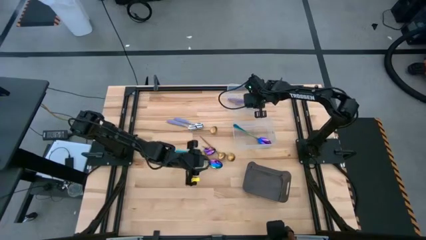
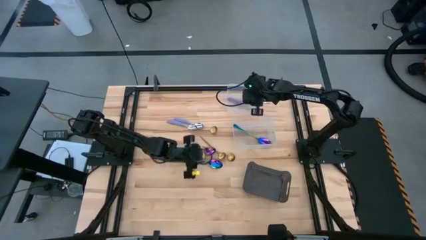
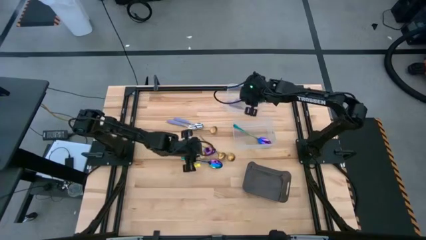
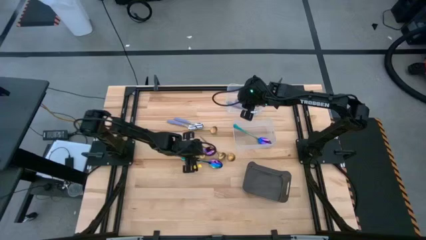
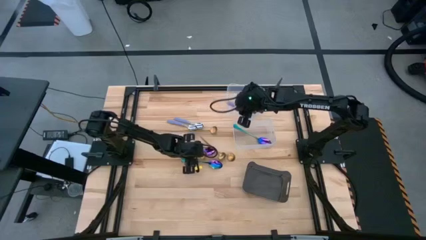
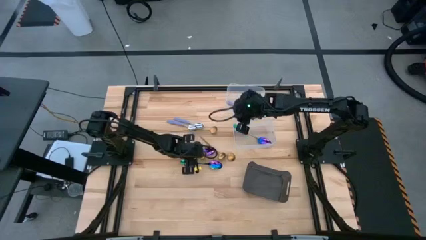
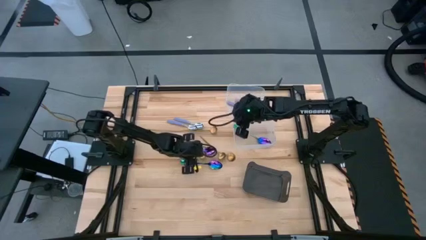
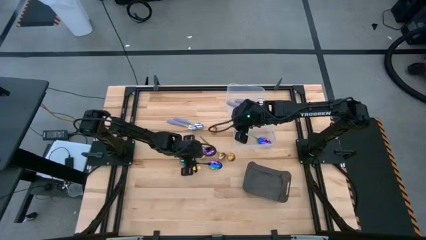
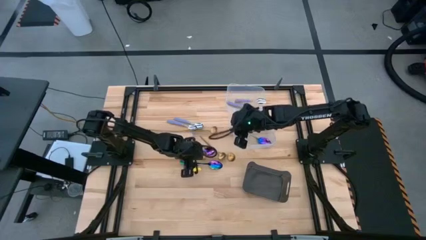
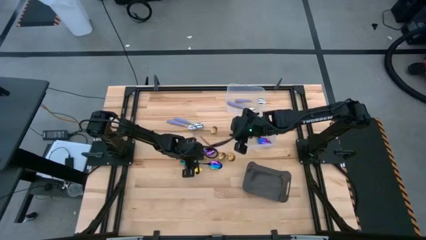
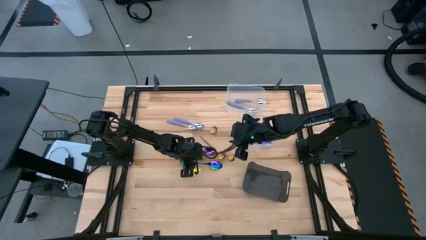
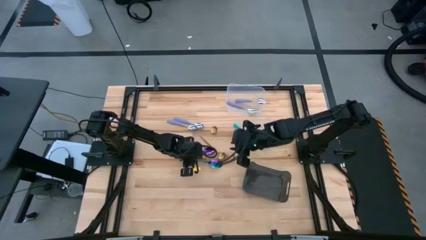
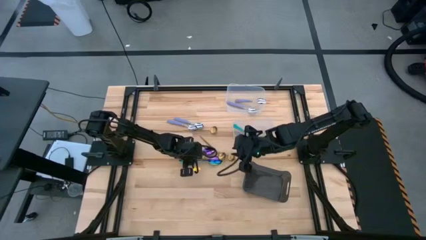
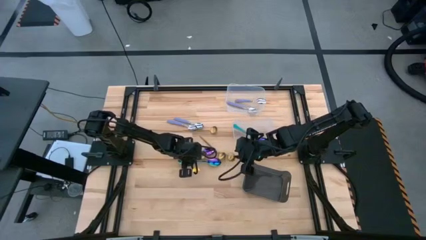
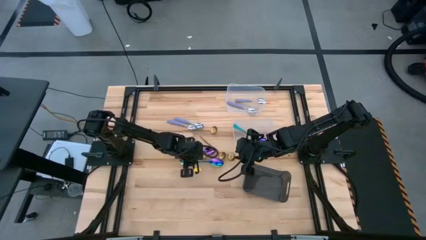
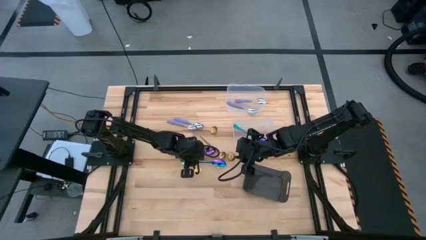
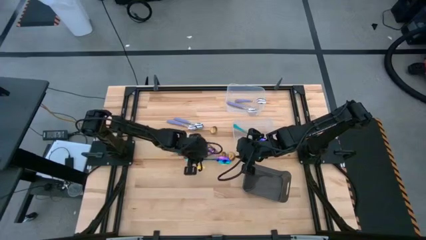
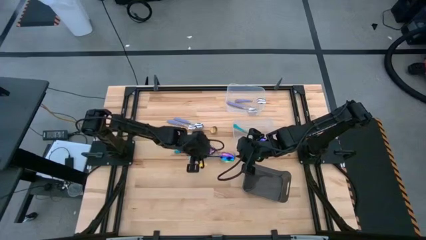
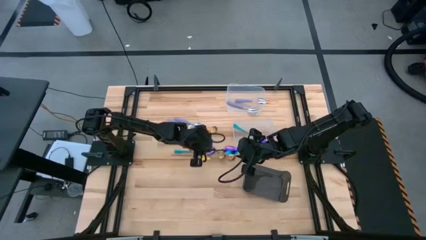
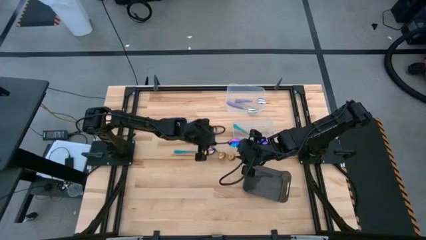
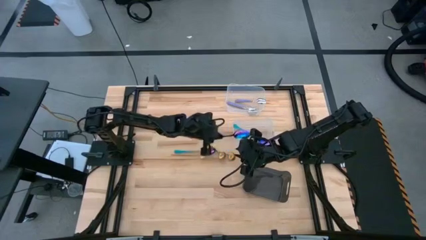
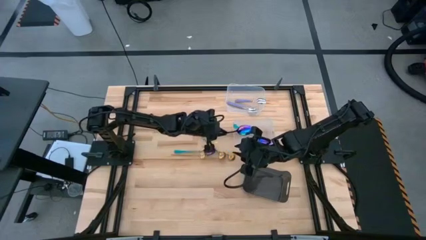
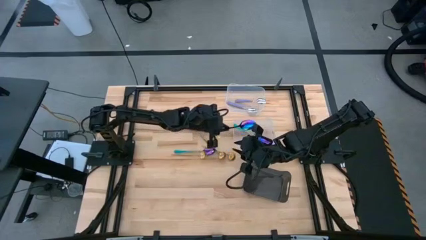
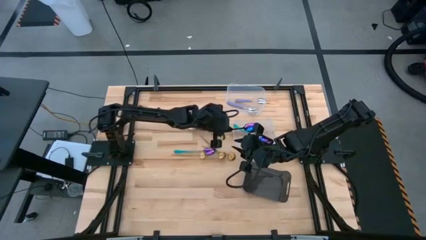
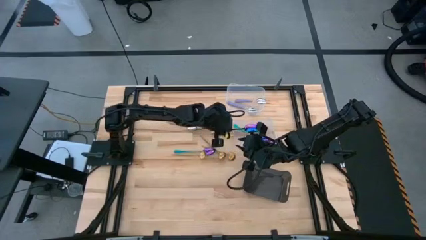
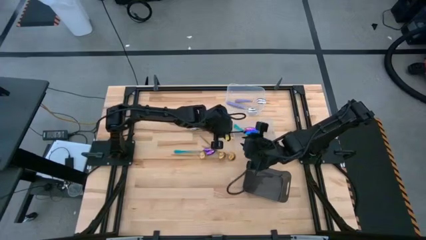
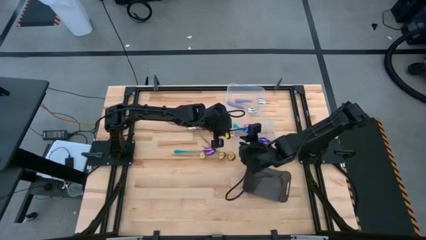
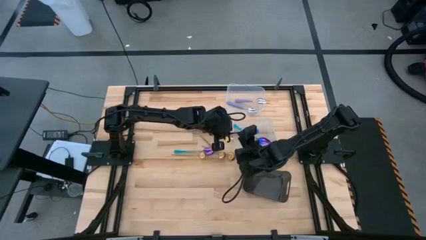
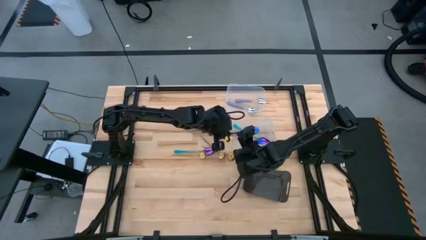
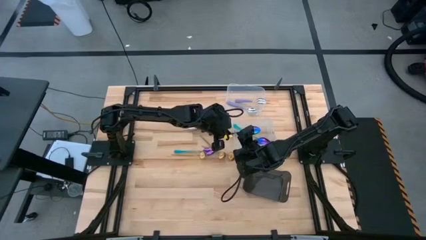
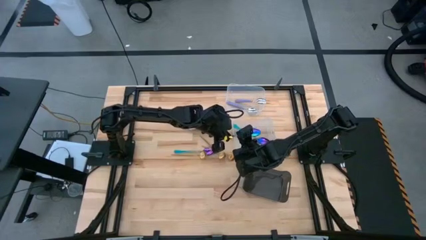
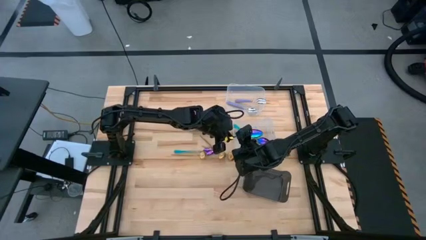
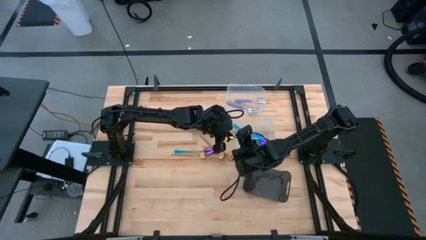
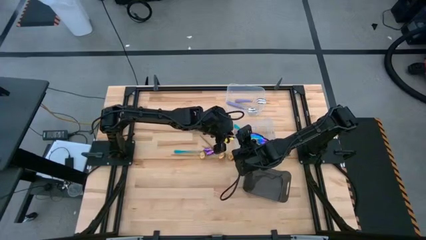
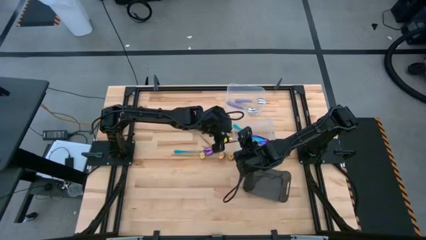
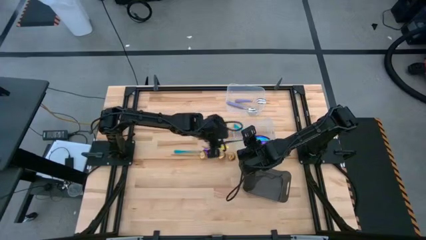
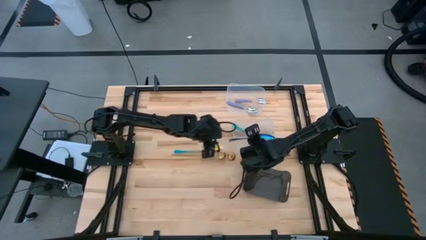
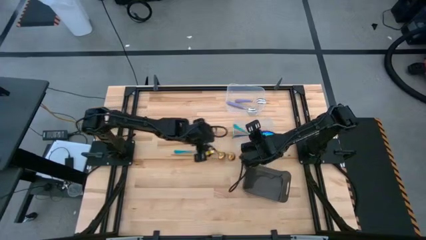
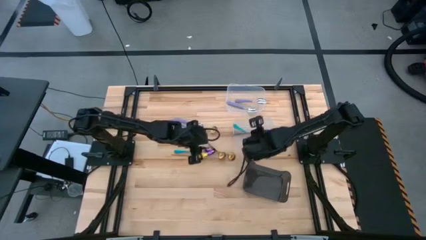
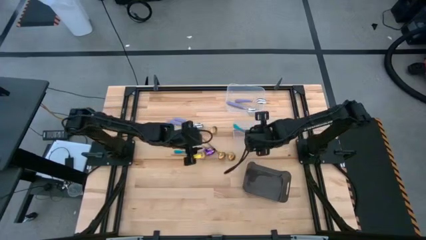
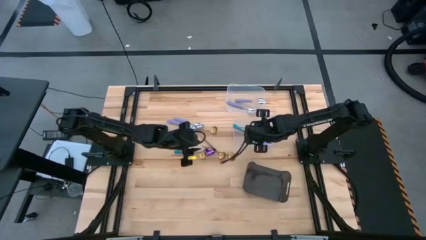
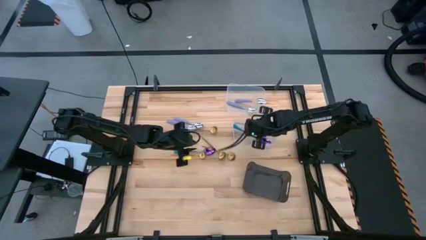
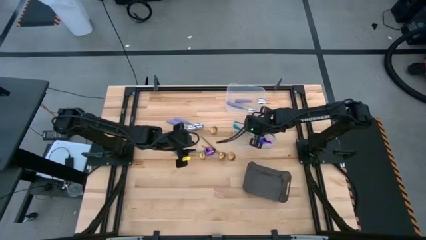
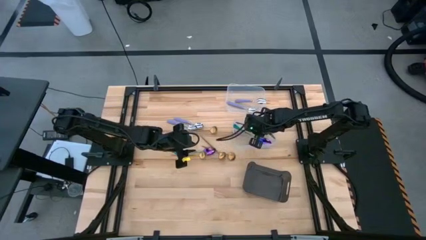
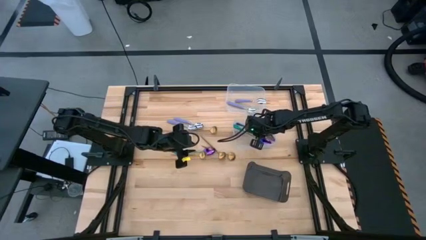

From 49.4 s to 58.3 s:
Task: Sort silverware by color (type)
Put the blue spoon into the bottom transparent bin

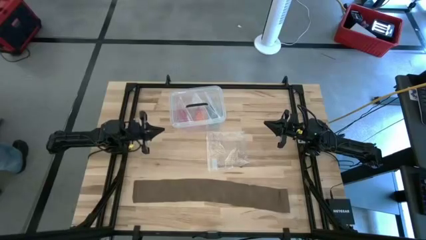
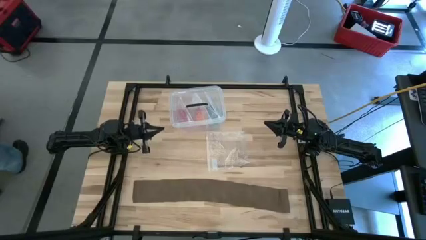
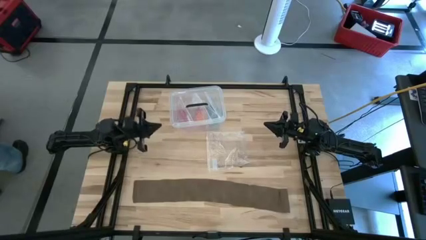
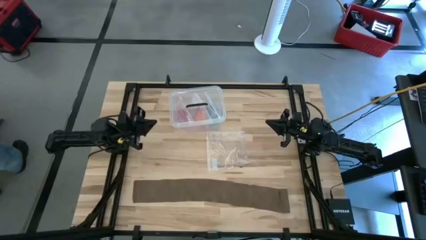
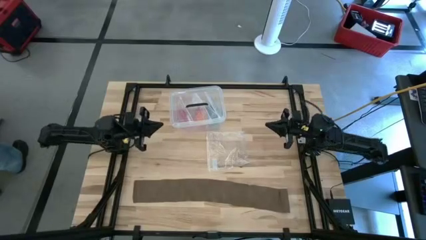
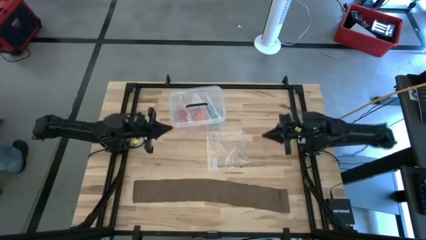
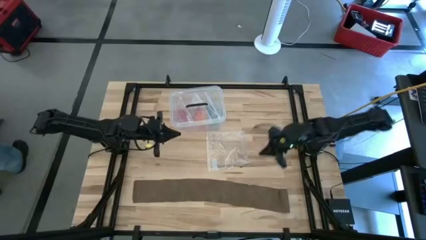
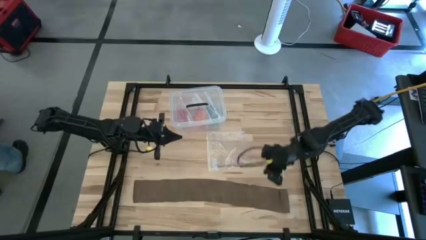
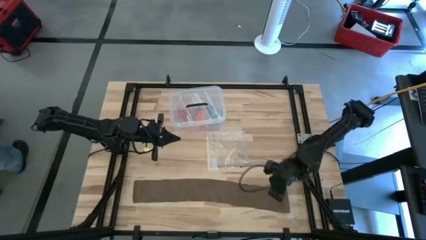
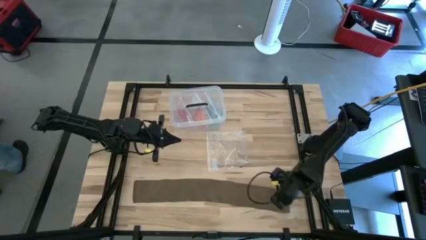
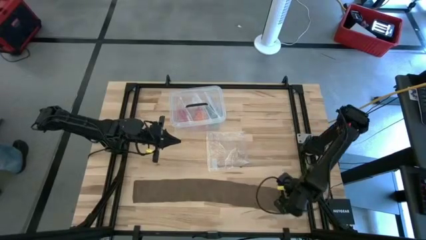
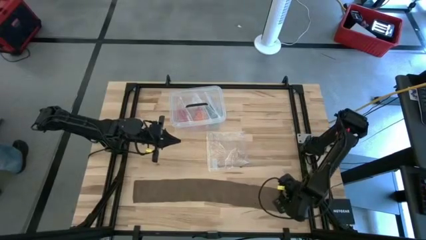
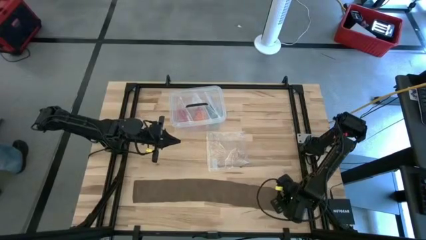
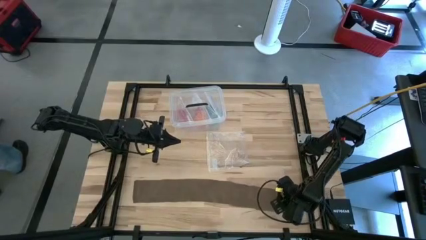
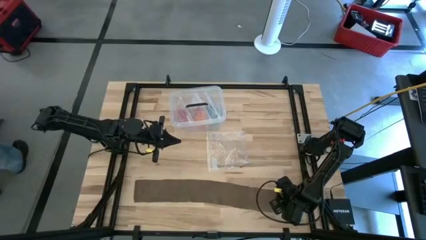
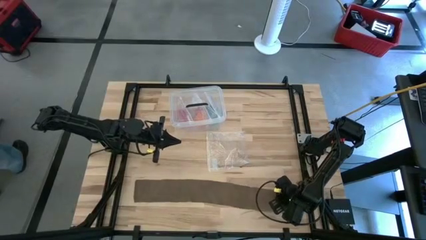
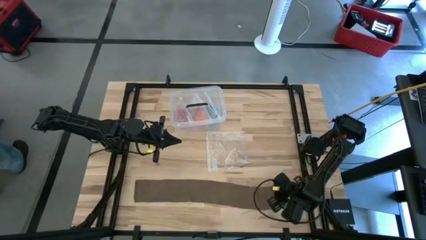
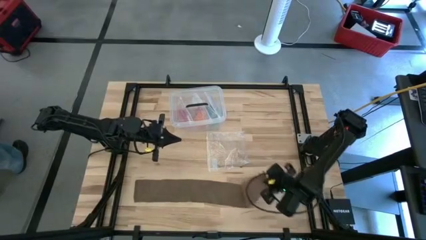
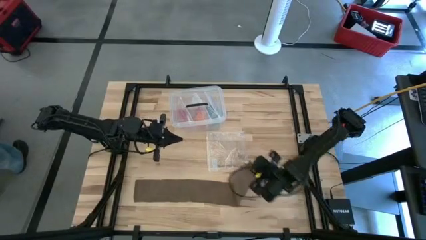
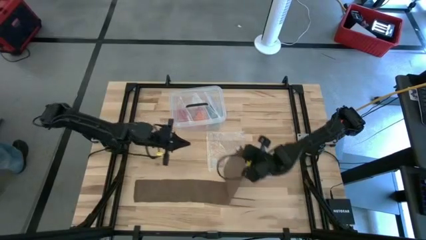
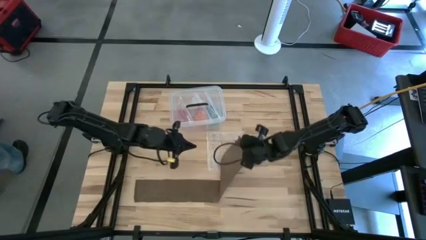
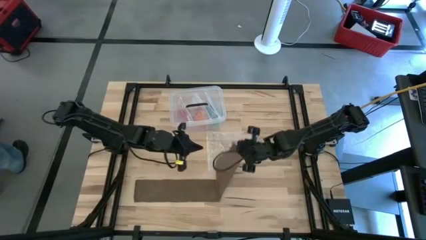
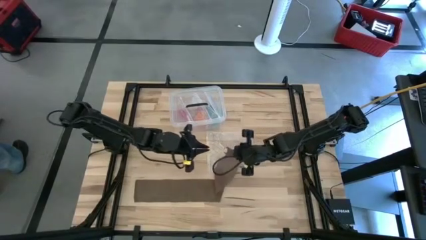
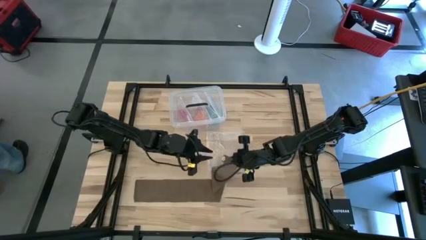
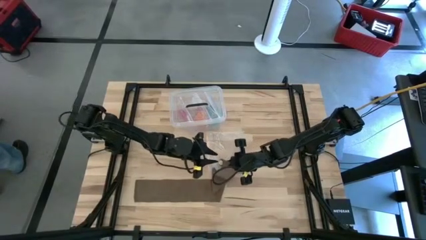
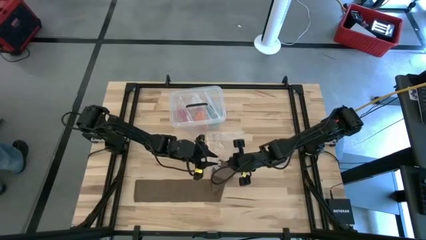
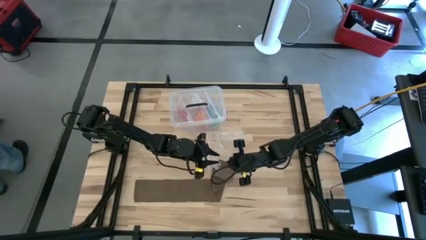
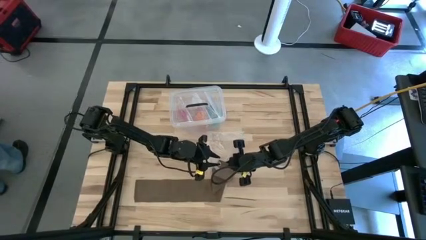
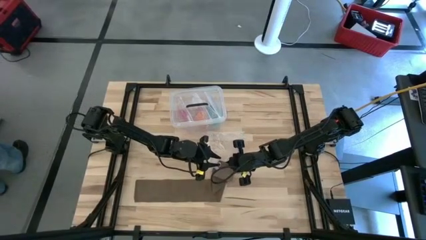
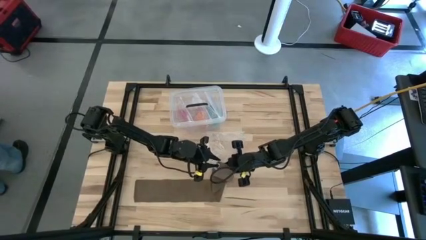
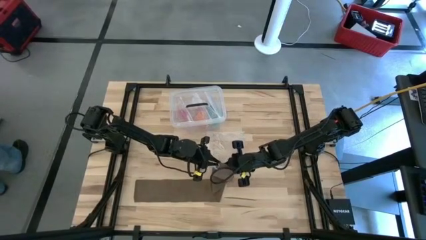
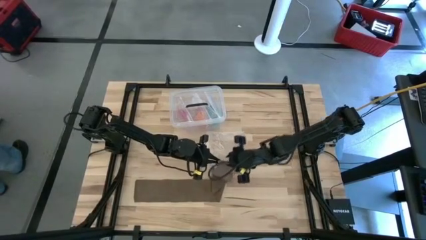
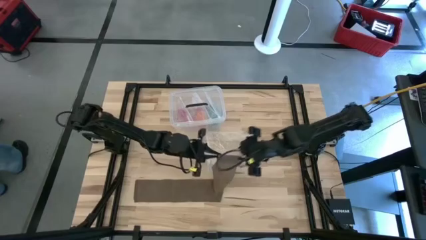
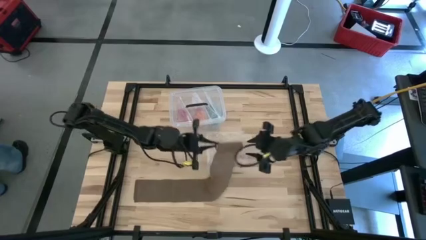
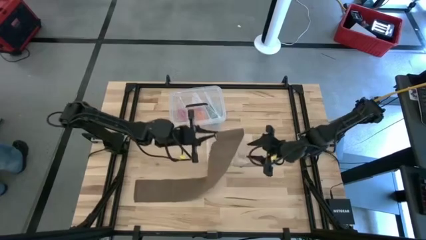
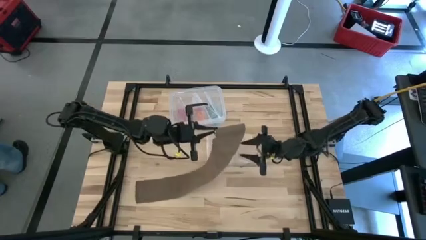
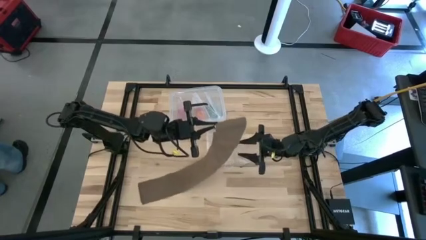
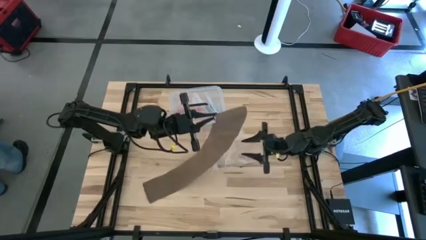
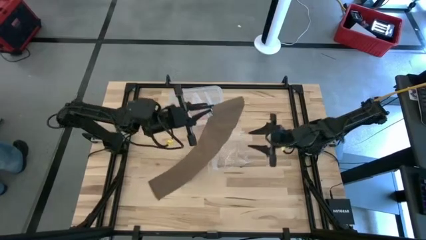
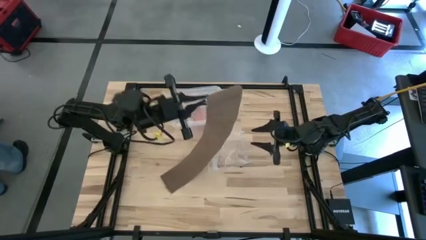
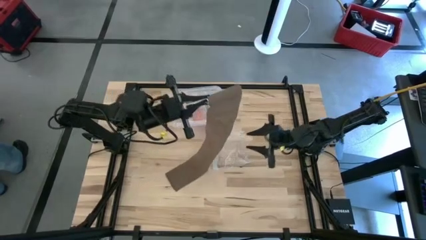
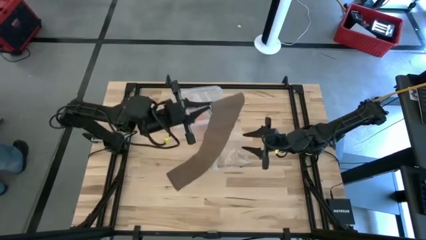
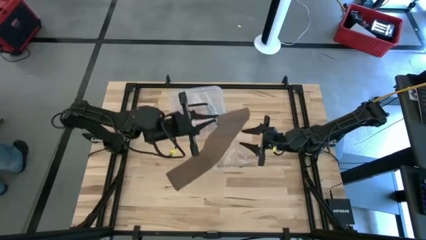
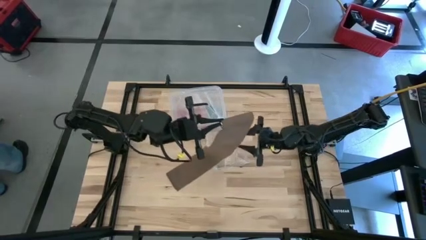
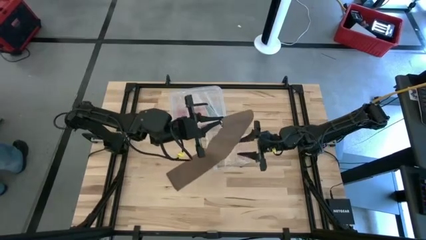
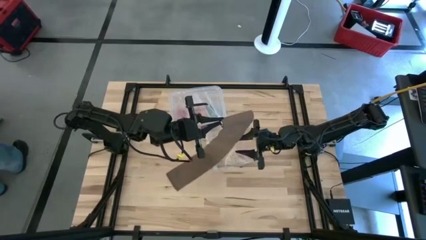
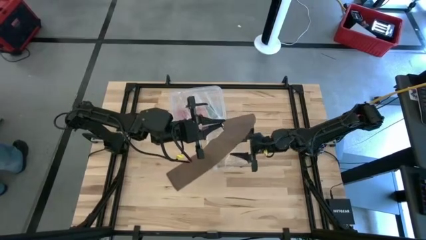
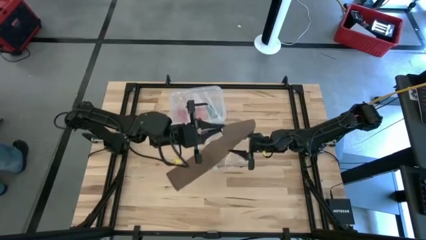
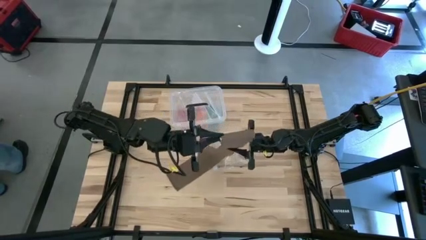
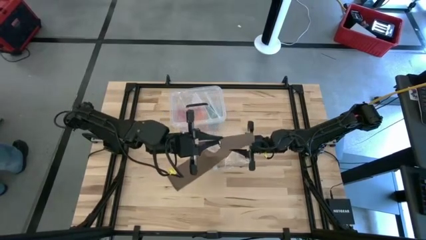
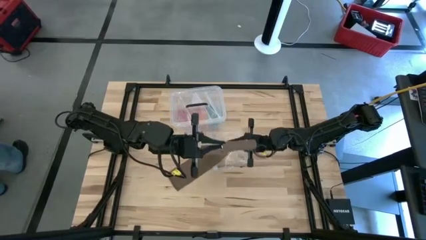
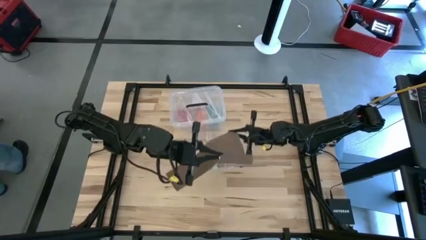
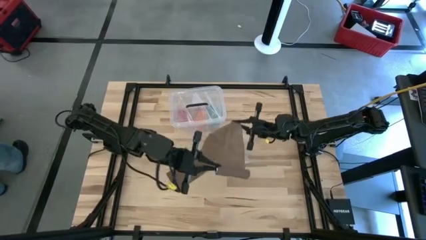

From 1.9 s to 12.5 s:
Task: Roll bandage
Roll the brown bandage
